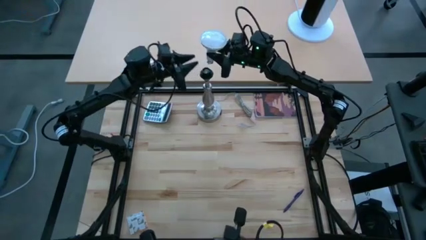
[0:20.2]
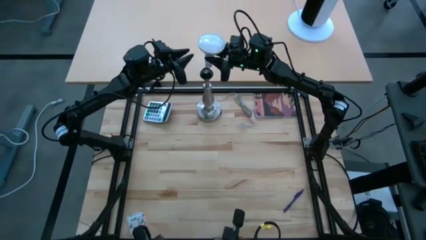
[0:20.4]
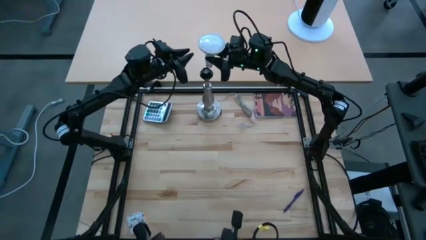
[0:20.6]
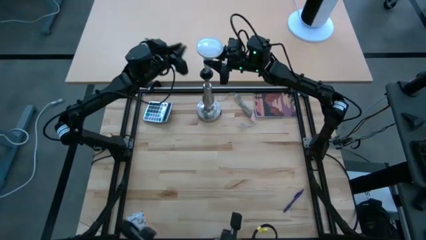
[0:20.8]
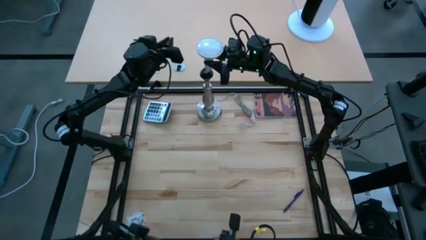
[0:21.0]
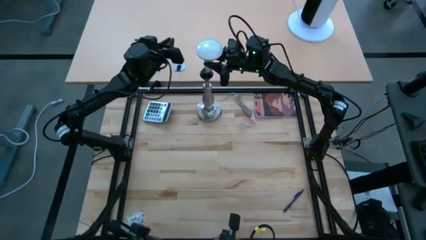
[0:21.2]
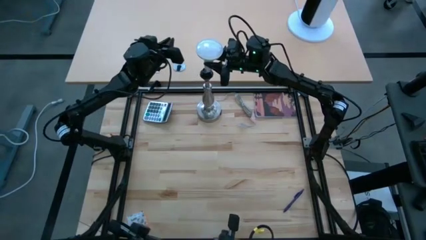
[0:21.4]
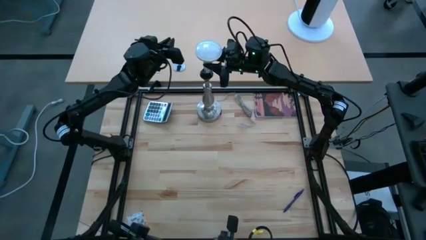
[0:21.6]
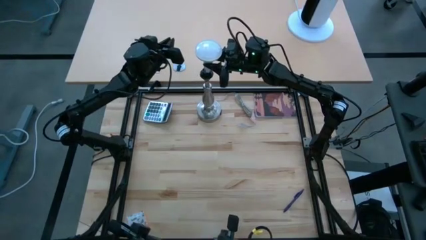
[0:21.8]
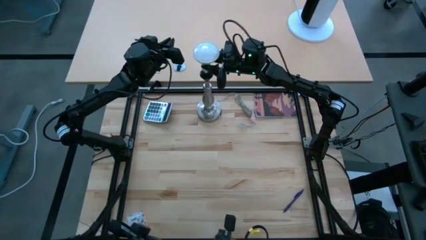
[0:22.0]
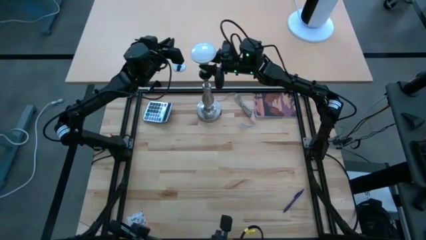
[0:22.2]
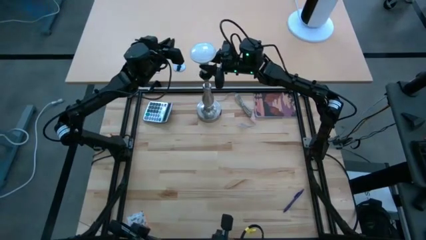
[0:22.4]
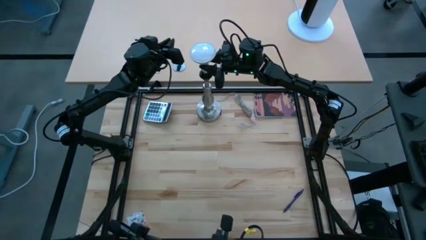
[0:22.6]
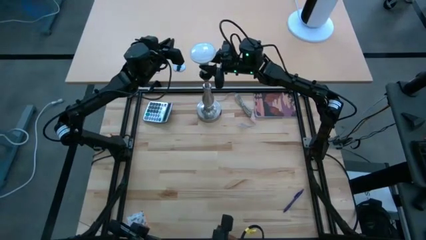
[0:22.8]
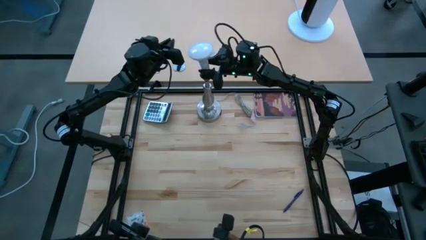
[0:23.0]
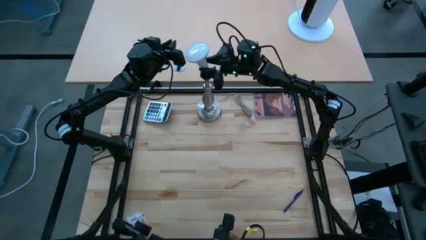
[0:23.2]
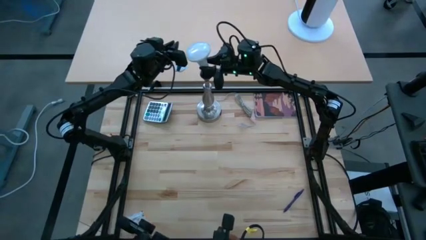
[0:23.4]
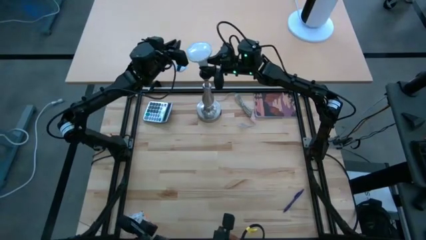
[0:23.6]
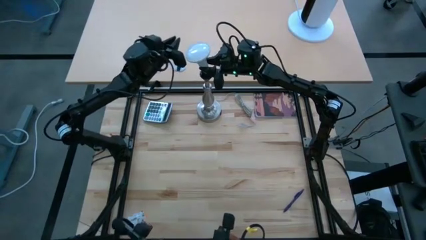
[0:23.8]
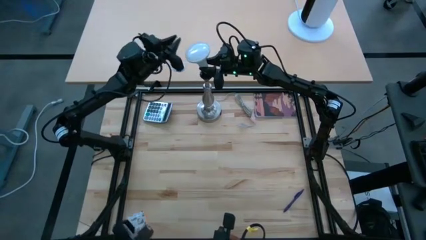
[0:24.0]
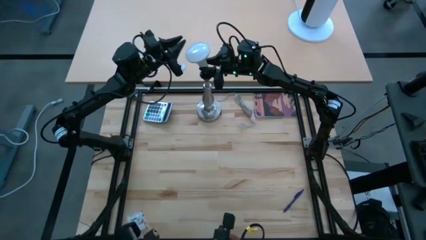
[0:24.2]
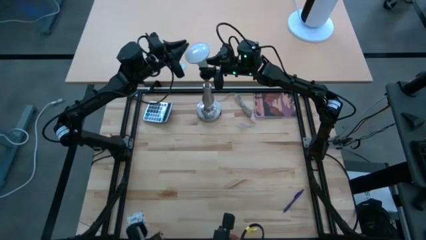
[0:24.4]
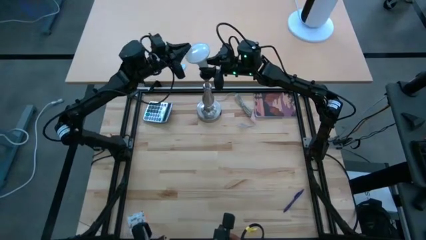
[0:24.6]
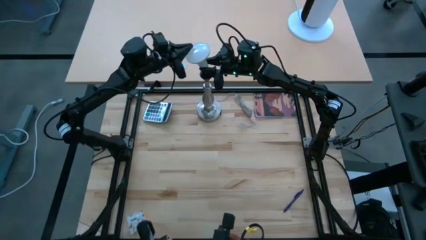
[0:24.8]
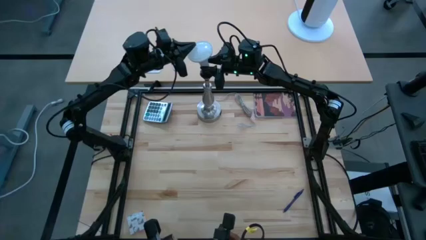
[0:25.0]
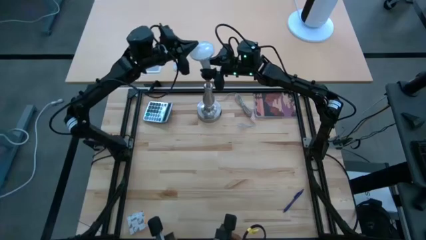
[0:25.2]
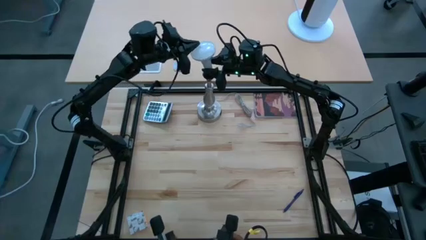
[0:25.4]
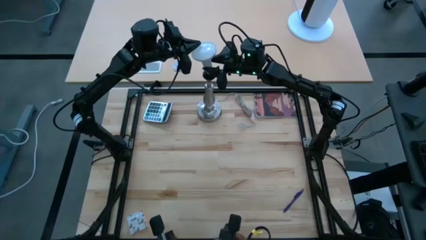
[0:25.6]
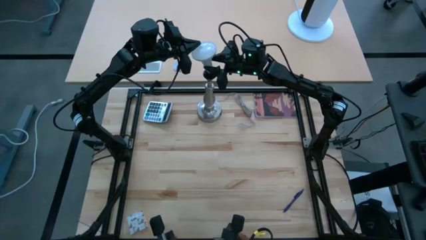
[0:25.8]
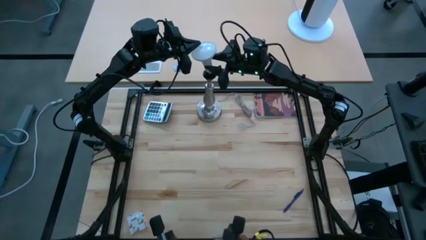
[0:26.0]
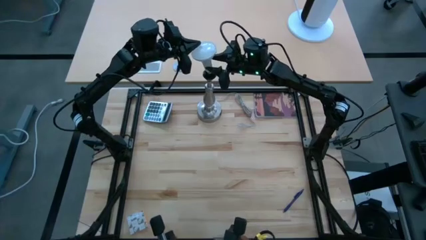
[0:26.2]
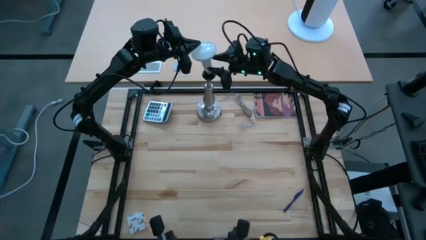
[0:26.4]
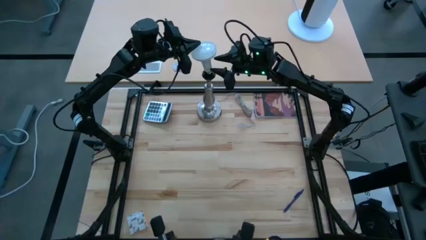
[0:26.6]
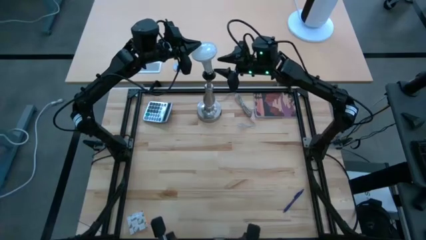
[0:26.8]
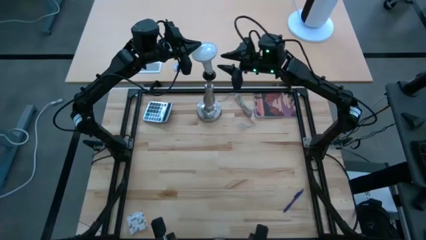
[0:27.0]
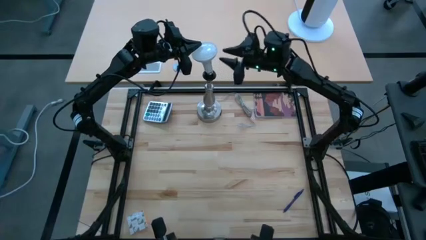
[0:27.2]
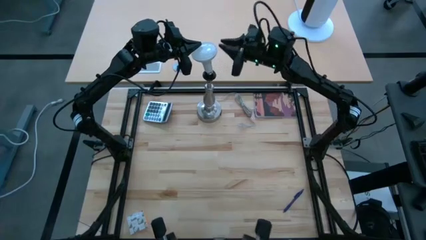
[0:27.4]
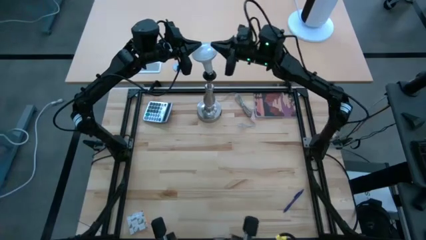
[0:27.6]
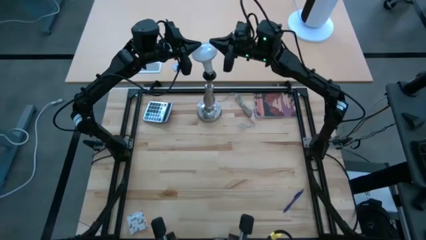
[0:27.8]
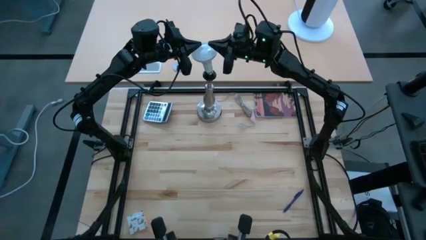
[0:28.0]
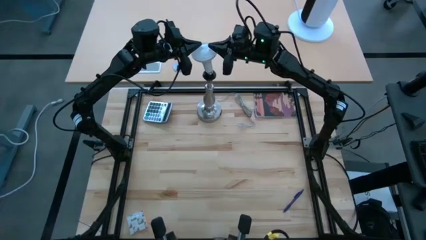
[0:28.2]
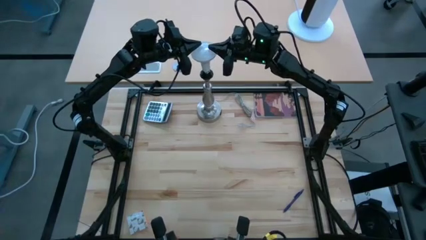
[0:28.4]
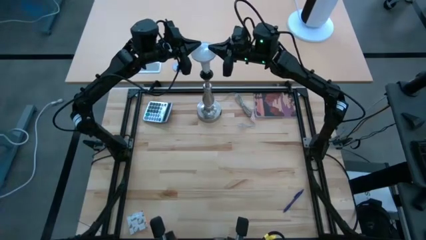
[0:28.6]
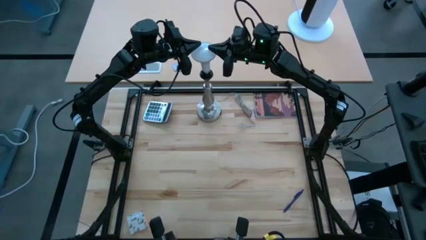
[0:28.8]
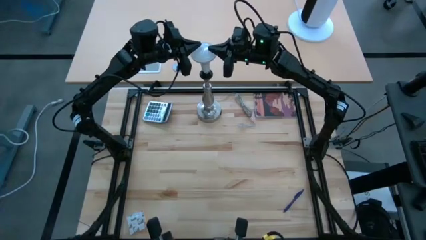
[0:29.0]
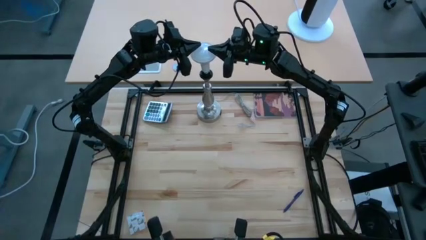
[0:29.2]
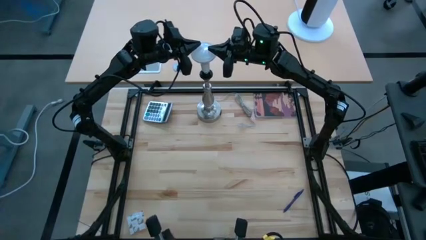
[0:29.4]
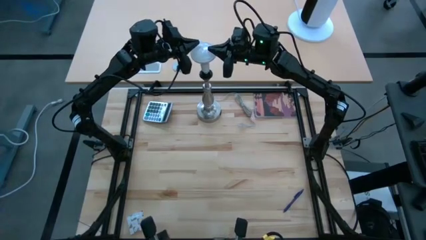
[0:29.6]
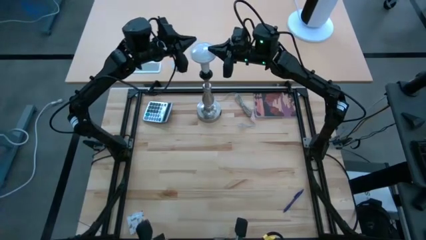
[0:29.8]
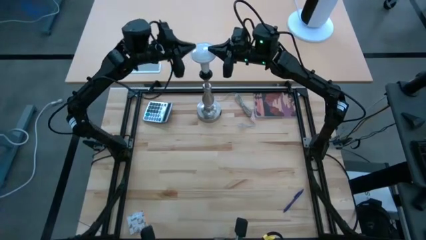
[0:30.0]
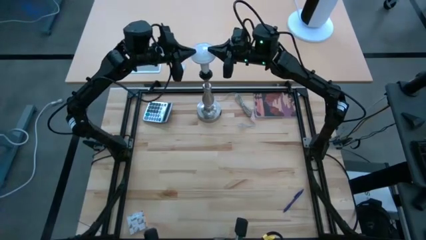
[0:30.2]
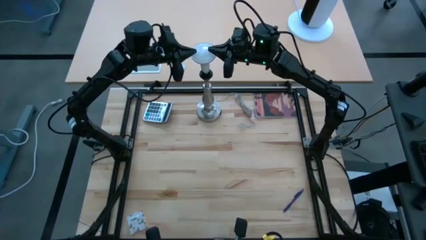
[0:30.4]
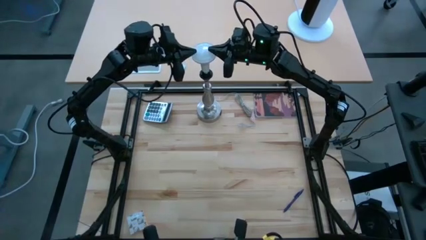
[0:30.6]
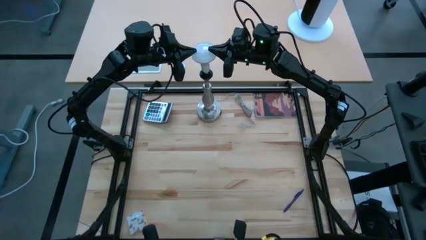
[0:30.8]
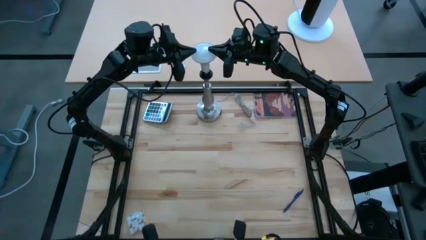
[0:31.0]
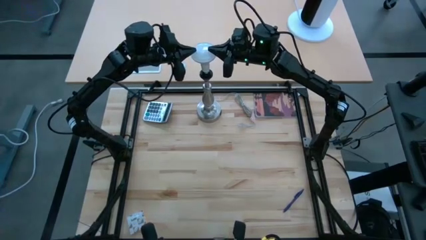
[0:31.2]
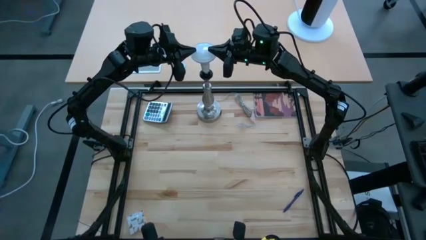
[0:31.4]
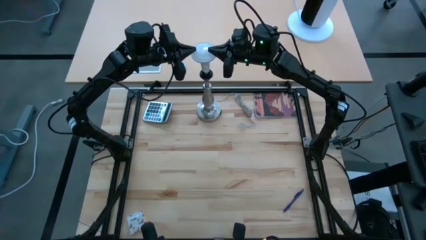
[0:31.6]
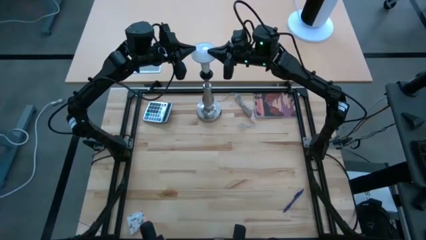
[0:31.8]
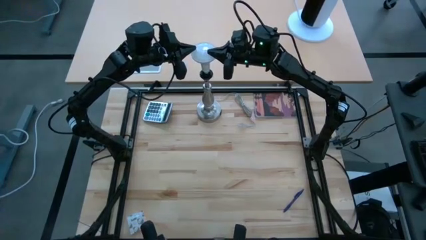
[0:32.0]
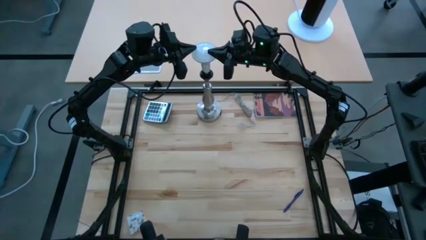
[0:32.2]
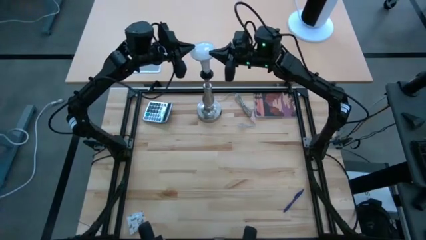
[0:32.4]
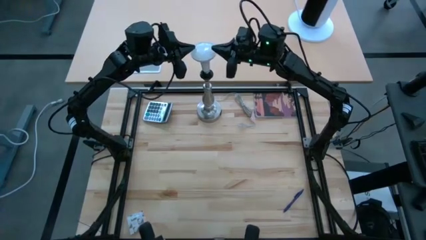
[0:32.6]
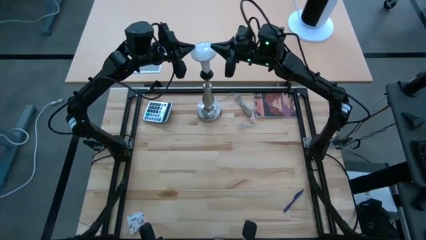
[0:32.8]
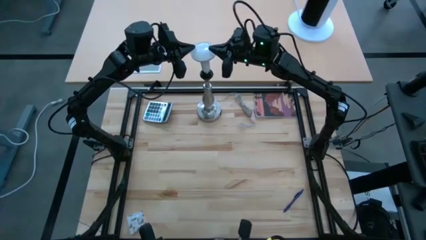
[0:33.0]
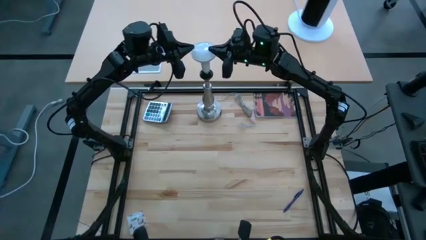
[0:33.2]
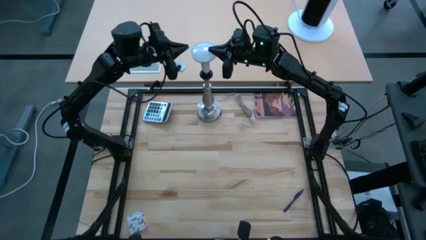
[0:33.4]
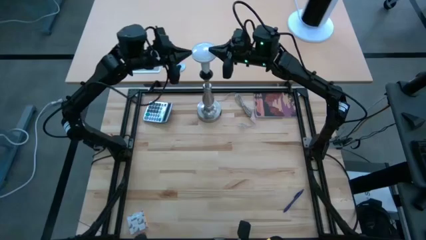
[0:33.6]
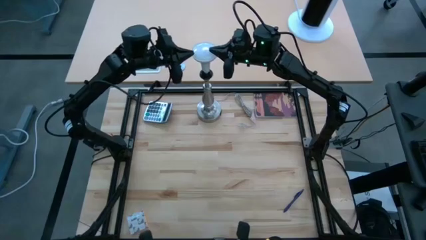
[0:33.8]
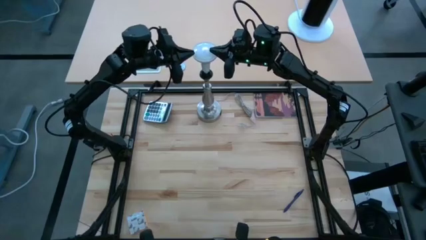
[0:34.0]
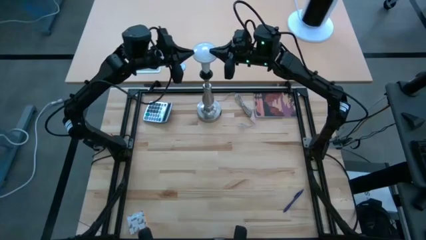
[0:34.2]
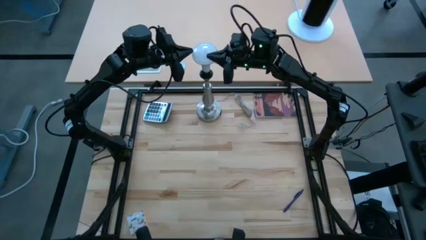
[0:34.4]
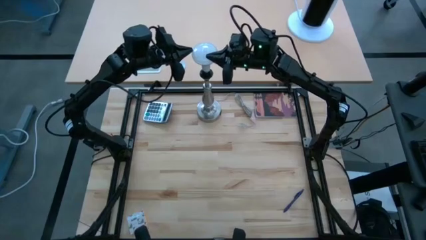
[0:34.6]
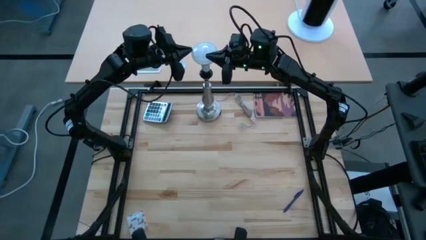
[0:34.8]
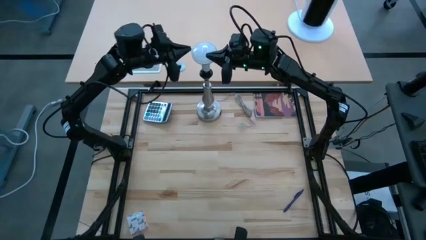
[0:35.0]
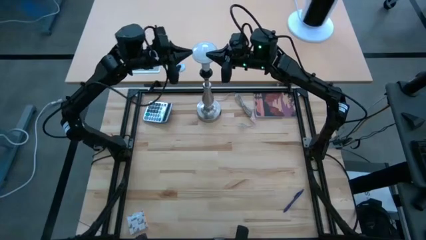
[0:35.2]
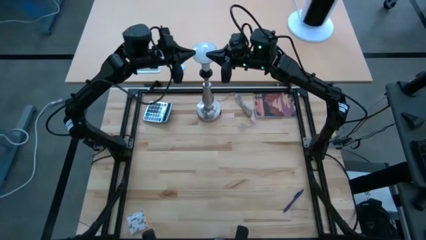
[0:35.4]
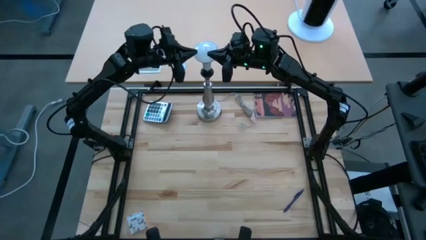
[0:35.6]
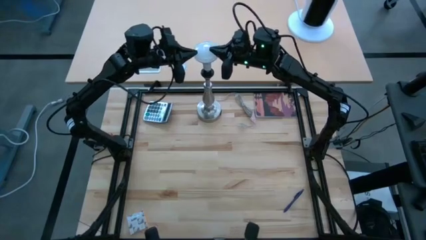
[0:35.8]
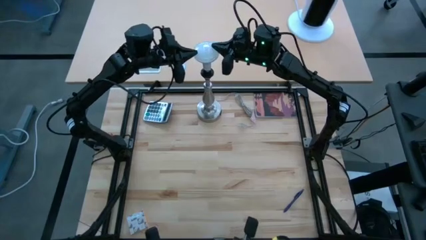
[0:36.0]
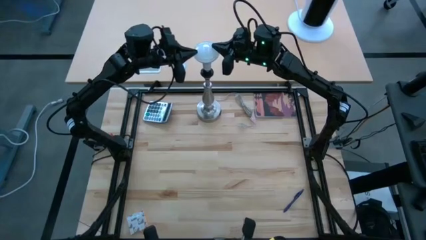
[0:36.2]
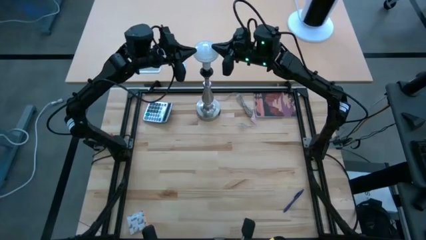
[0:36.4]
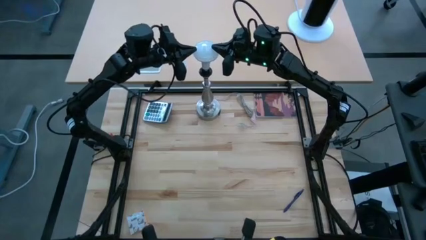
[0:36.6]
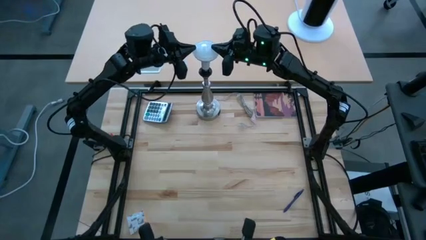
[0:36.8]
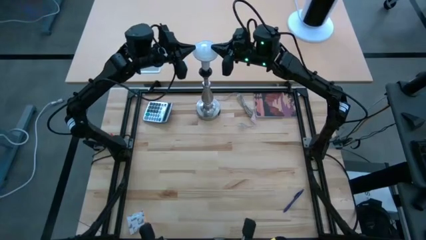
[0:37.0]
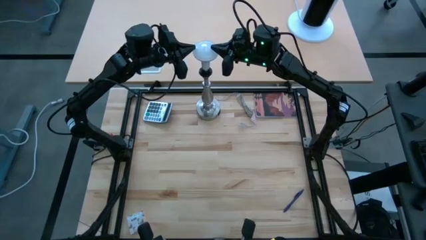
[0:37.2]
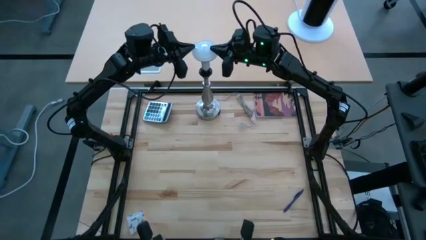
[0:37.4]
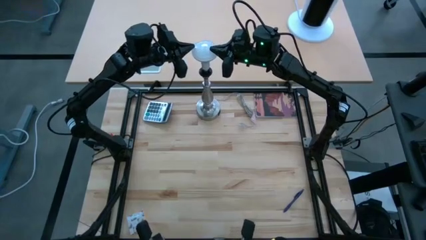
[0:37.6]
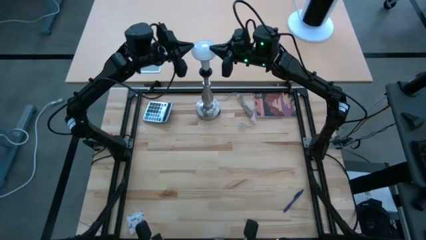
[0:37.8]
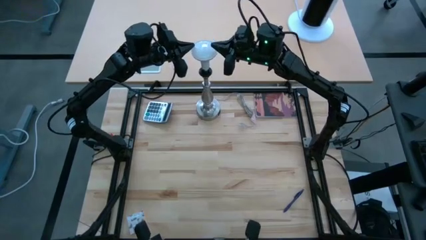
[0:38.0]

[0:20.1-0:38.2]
Task: Screw lightbulb
Insert the lightbulb into the table lamp
